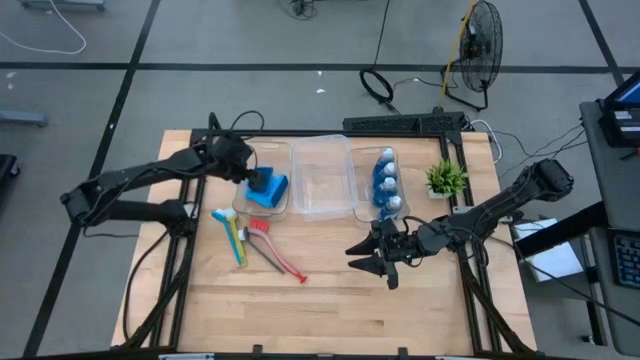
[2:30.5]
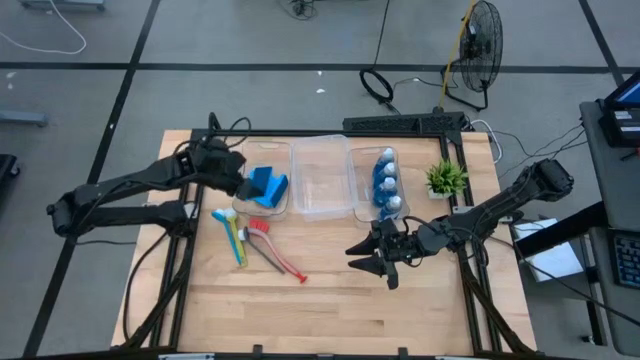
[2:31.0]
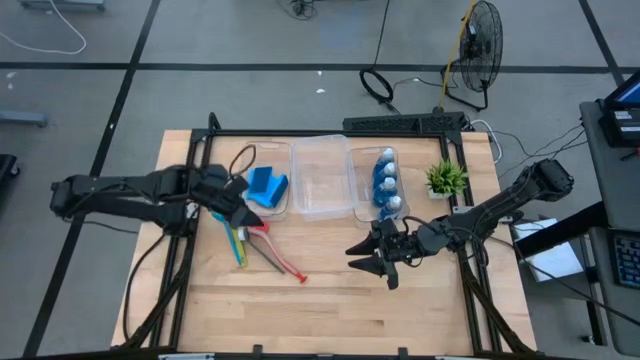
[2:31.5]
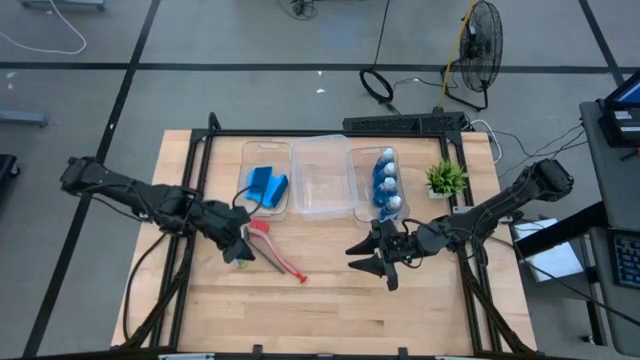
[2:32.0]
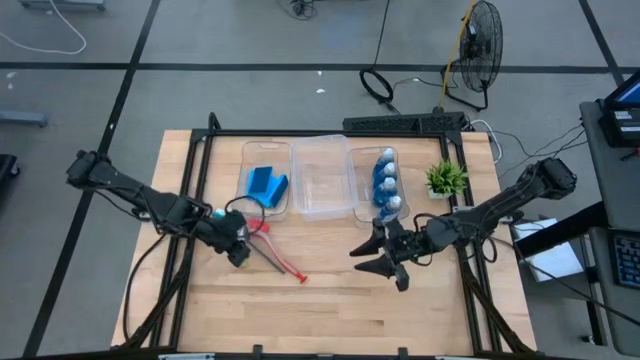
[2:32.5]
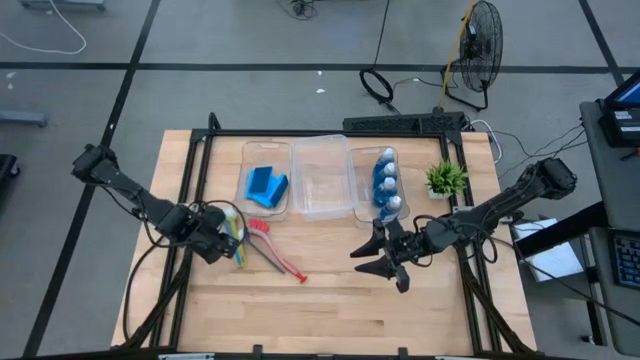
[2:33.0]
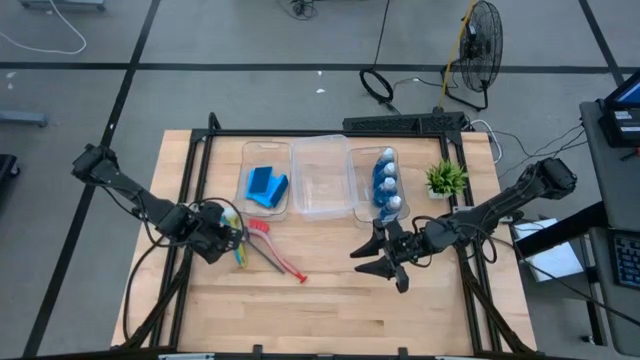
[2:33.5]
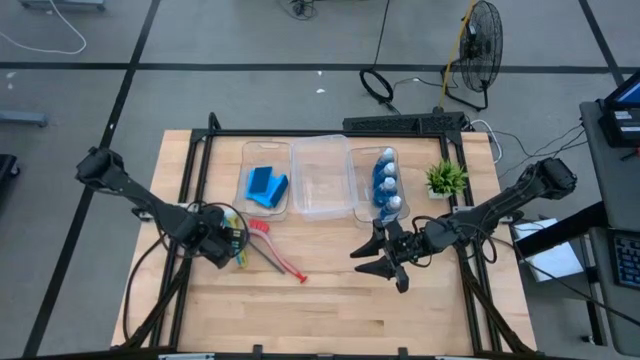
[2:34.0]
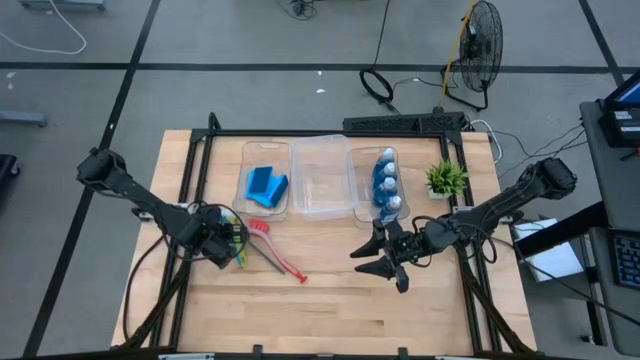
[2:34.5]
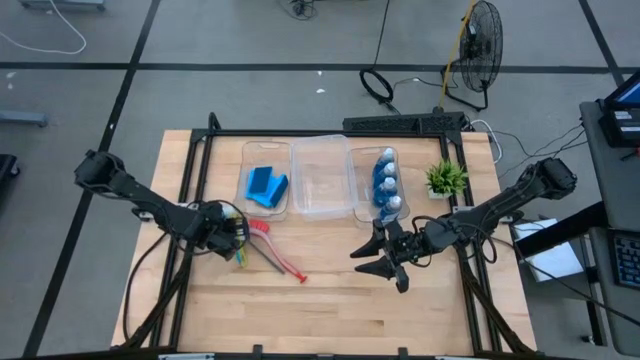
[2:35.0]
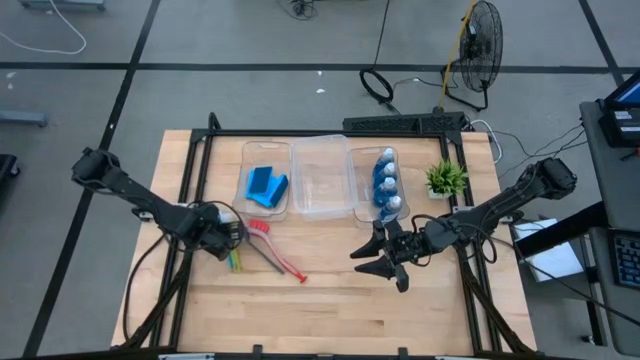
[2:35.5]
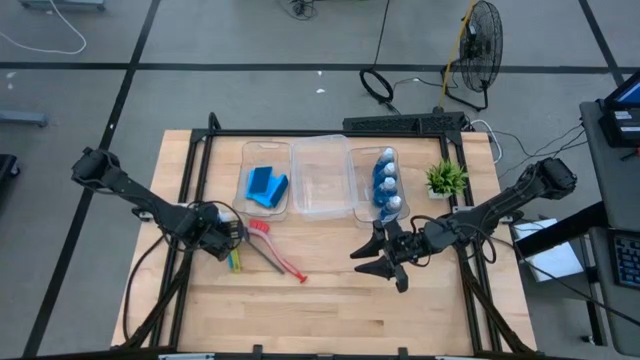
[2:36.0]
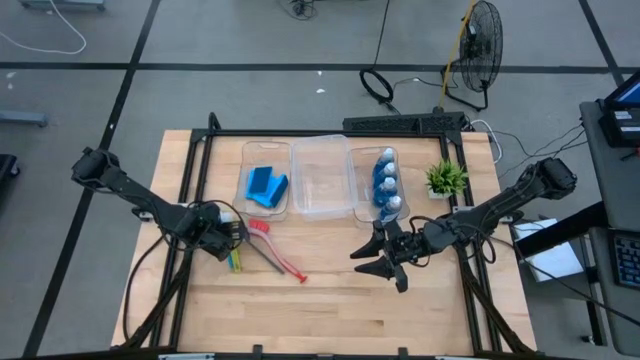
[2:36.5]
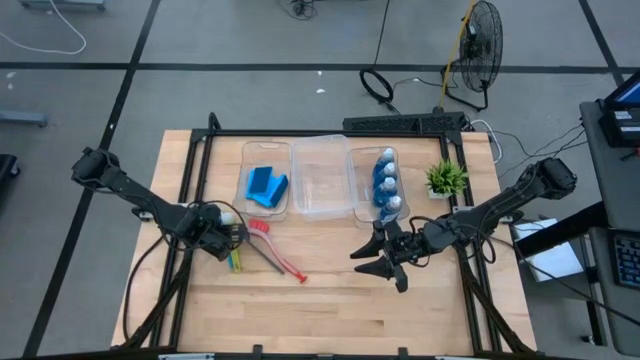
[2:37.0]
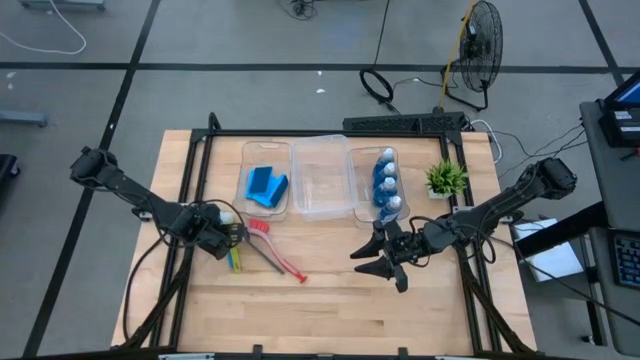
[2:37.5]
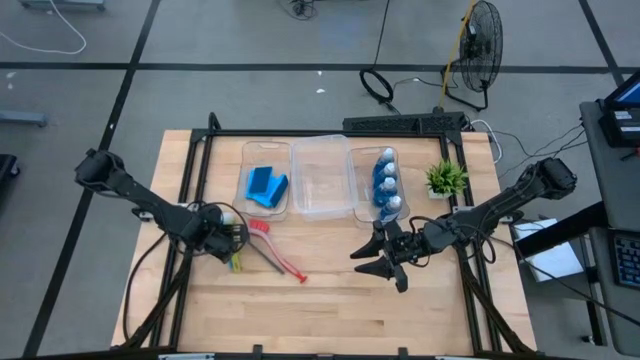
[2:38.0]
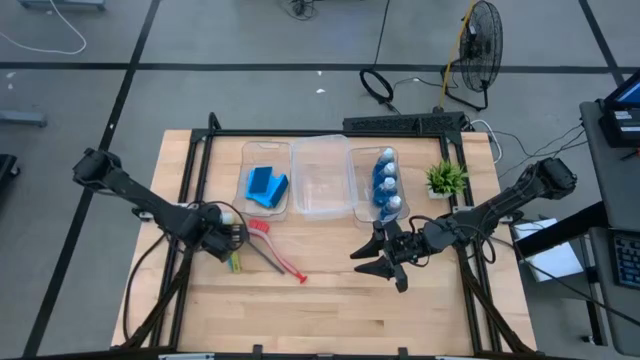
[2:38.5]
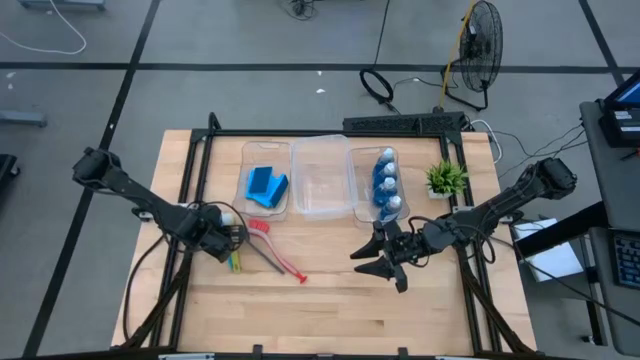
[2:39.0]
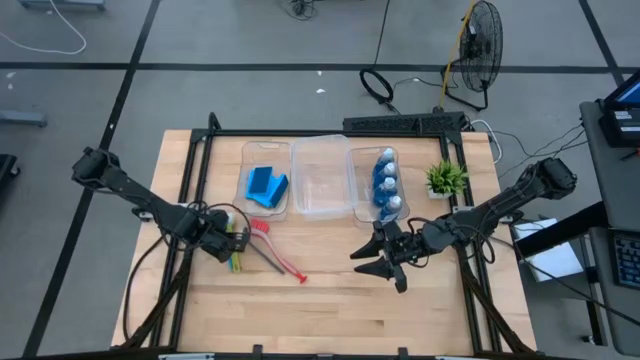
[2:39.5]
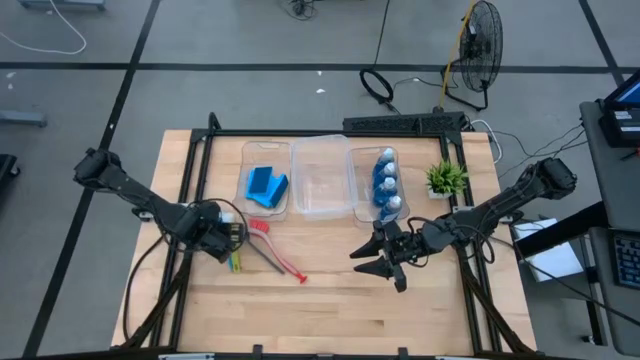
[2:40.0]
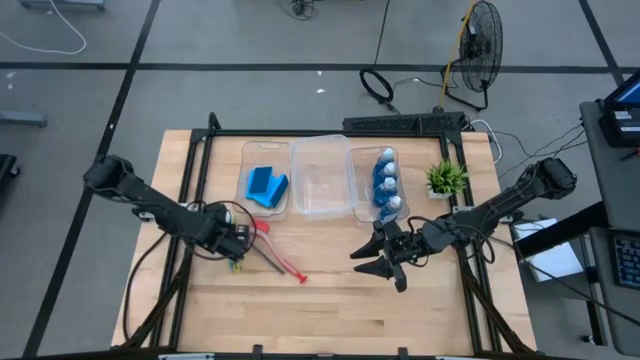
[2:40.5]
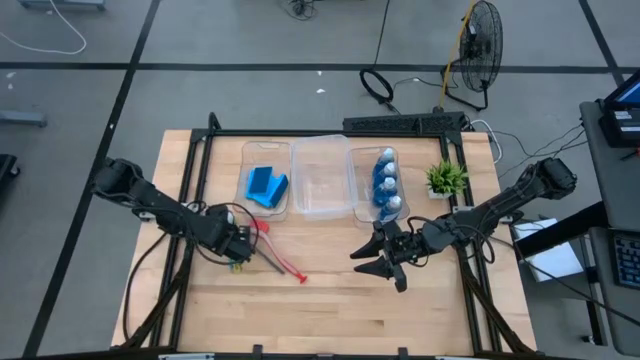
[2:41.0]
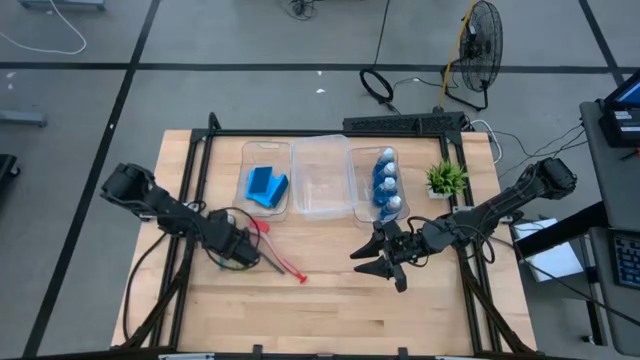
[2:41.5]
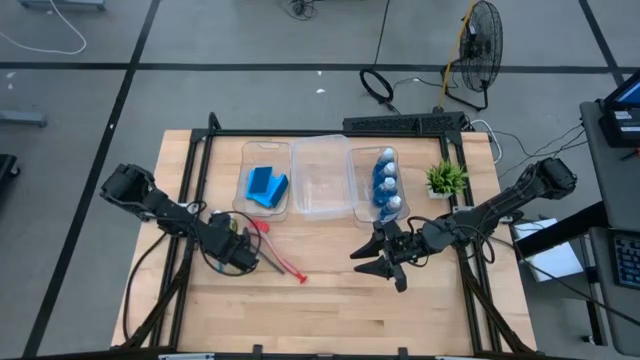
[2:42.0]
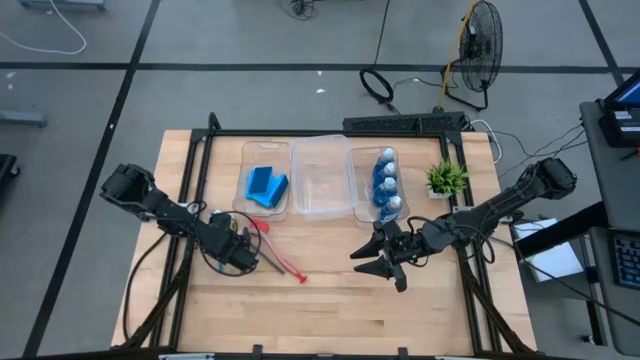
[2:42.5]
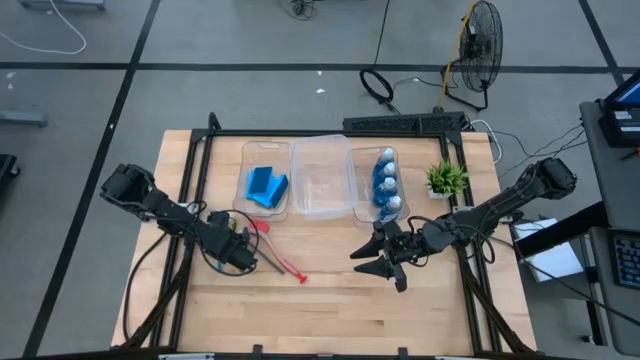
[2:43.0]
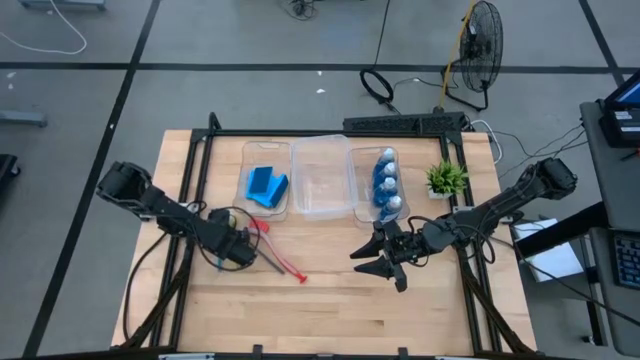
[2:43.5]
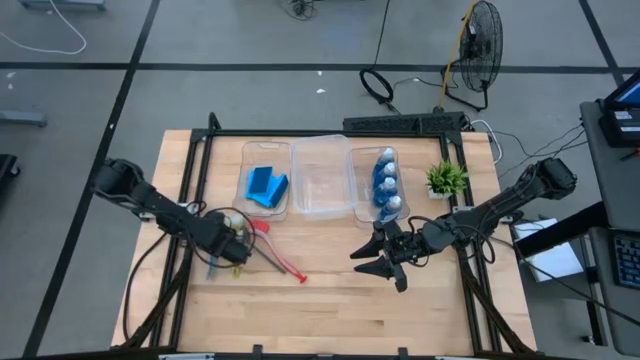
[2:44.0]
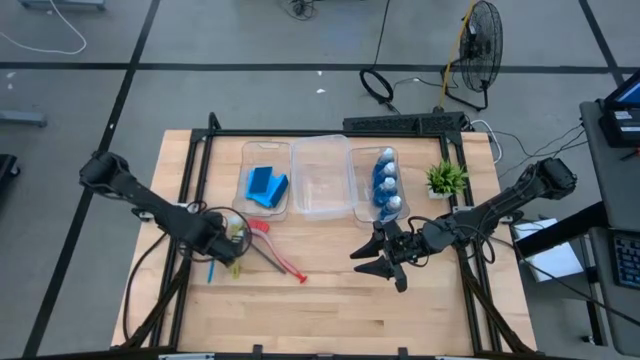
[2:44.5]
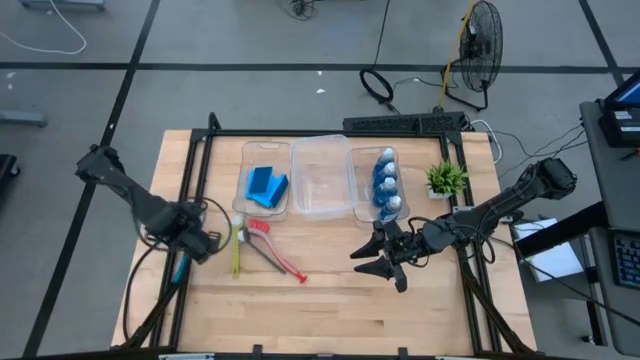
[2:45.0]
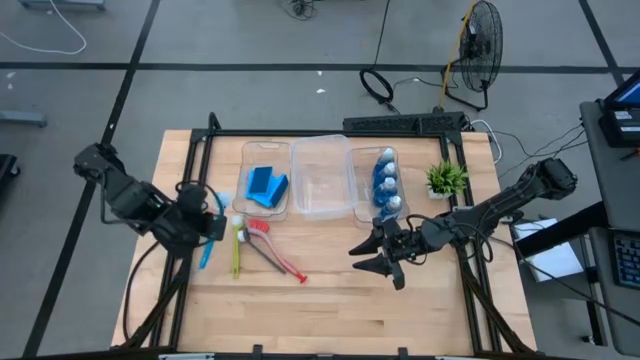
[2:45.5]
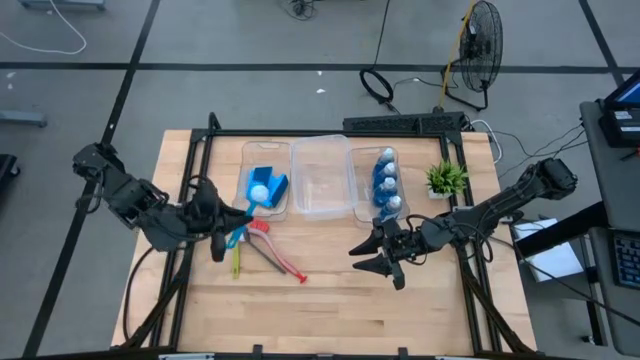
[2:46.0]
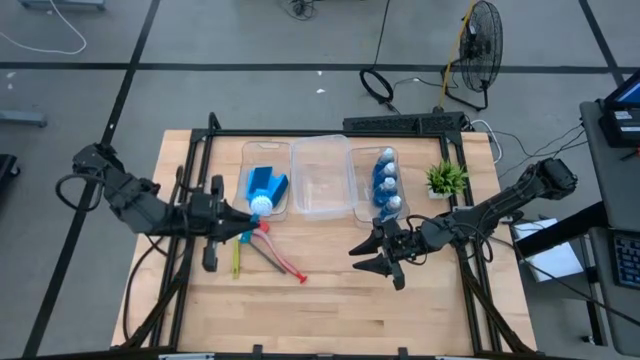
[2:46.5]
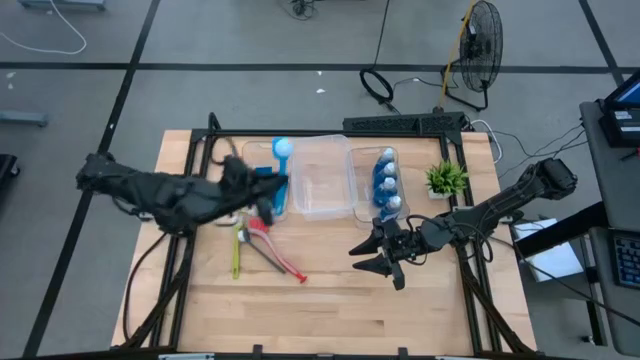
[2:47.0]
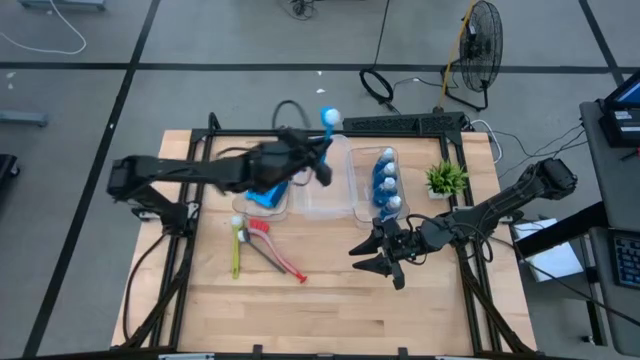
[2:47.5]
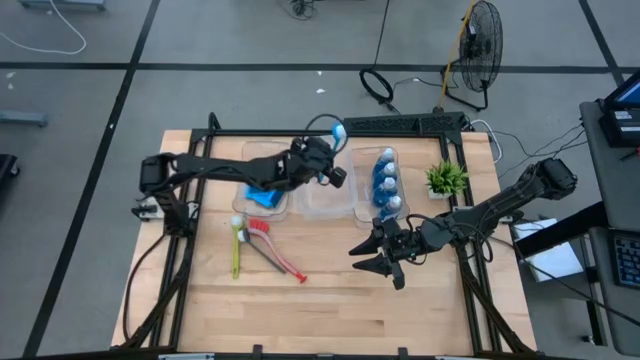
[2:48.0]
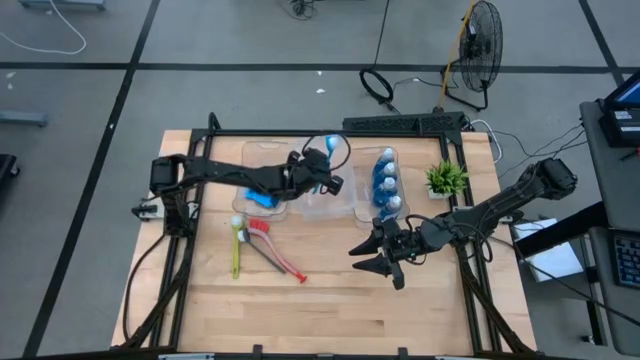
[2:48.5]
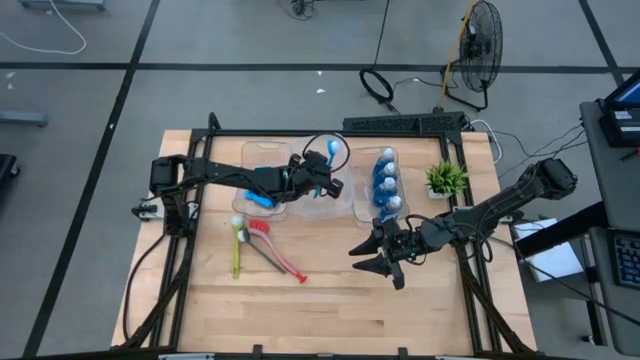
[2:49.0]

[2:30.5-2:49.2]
Task: Pick & Place Kitchen Sink Supplies
Put the blue dish brush into the white bin

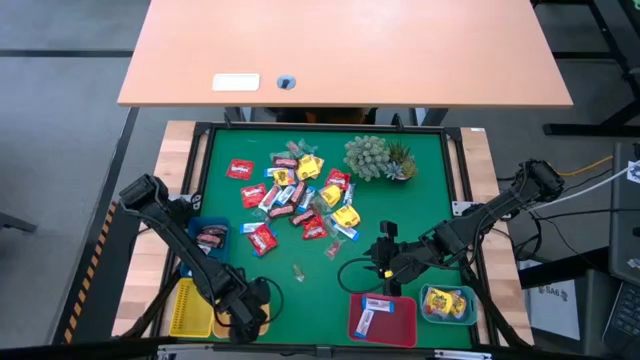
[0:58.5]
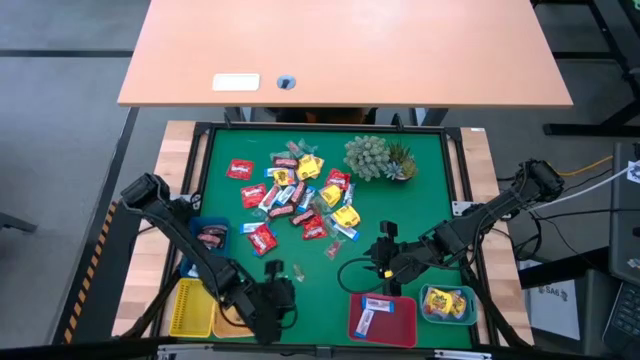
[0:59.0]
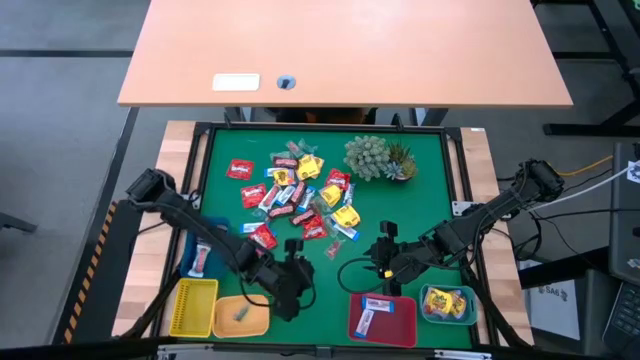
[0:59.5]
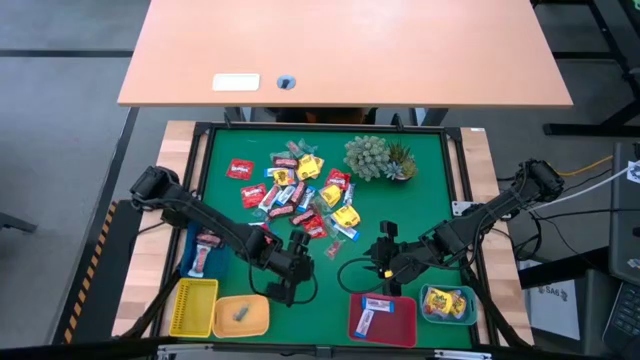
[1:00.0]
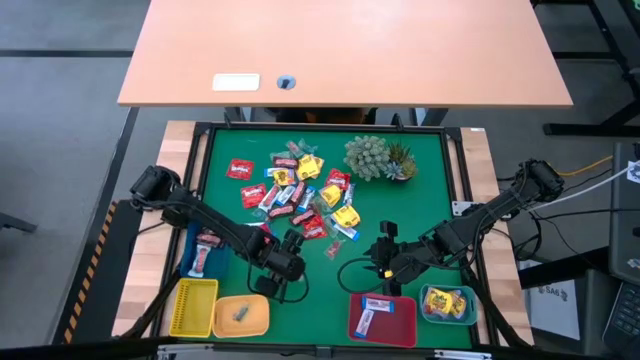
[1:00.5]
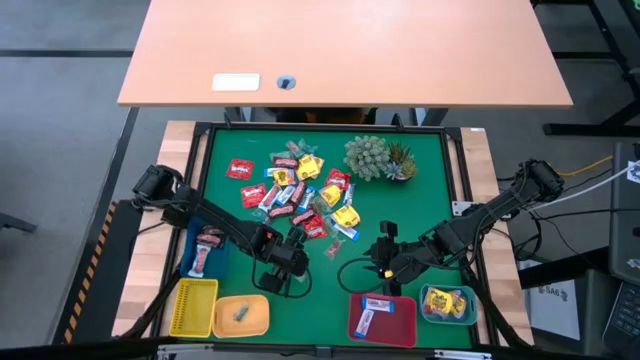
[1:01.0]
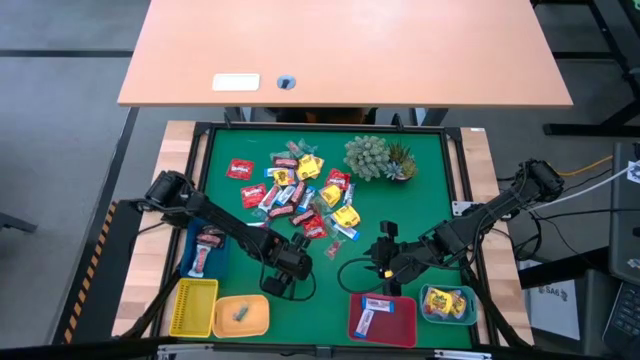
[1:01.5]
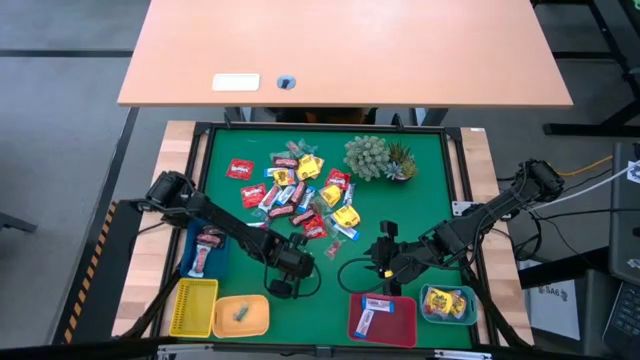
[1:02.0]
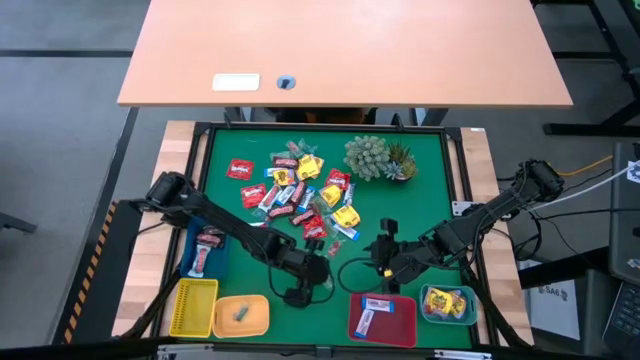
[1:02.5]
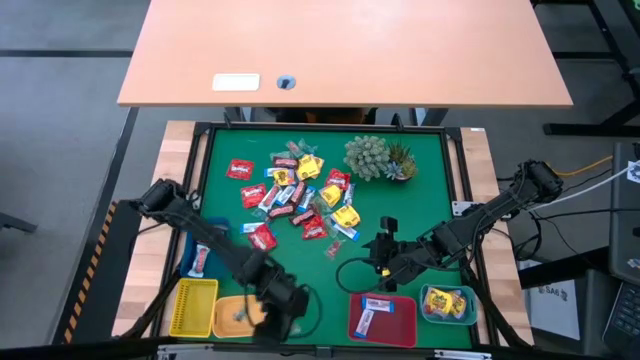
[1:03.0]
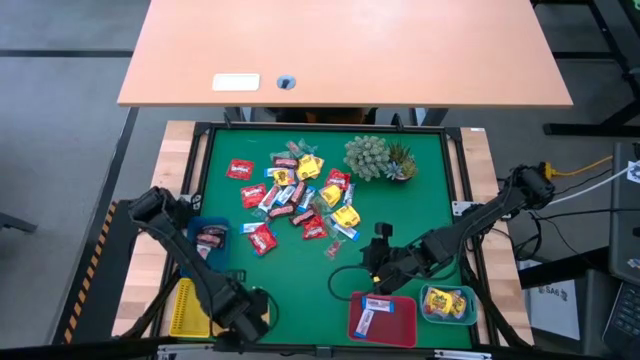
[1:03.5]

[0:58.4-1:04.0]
Task: Sort candy
Put the transparent candy into the orange bin
